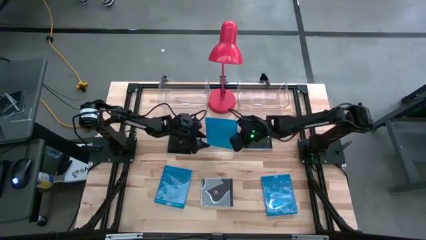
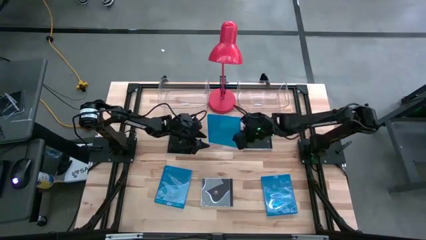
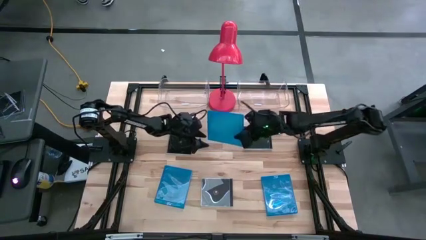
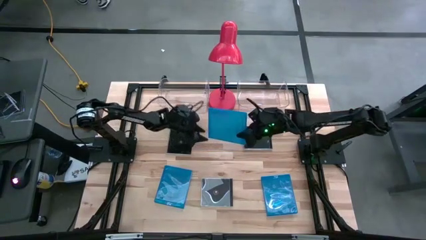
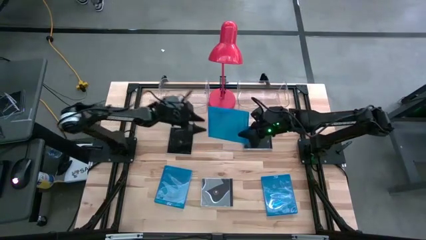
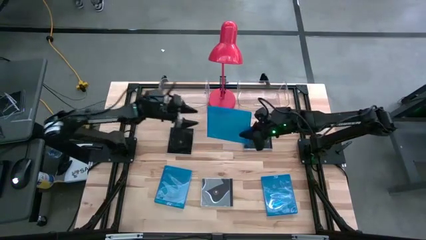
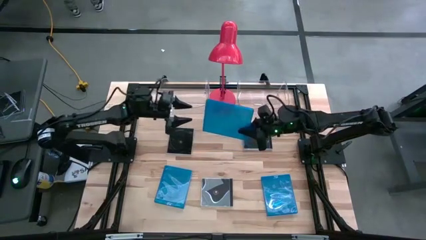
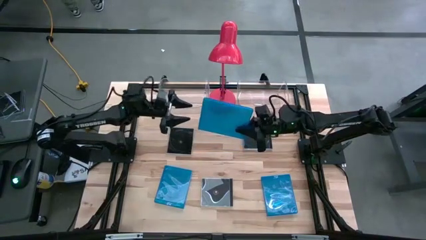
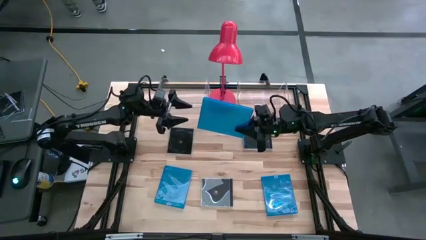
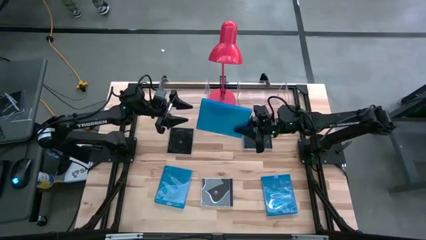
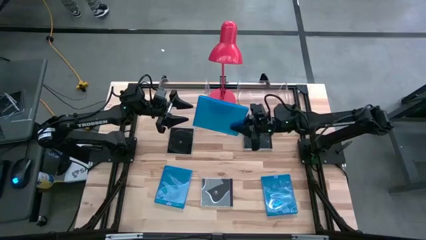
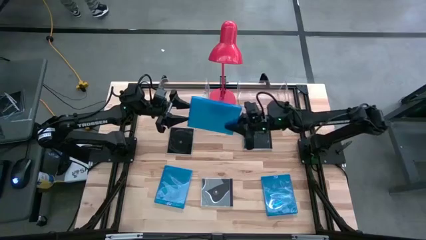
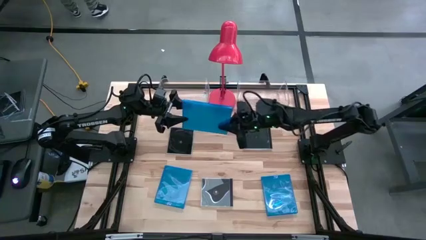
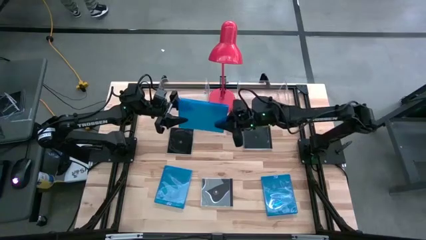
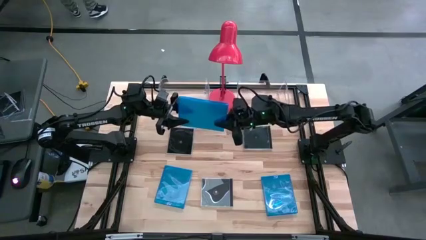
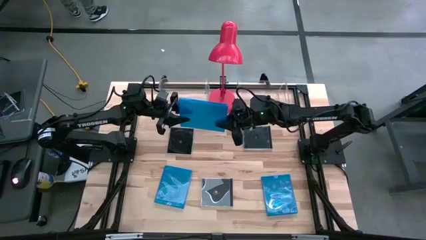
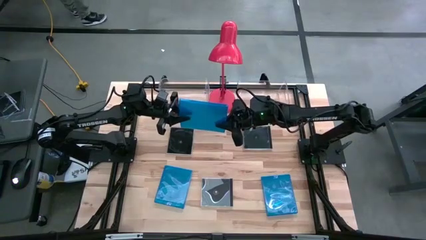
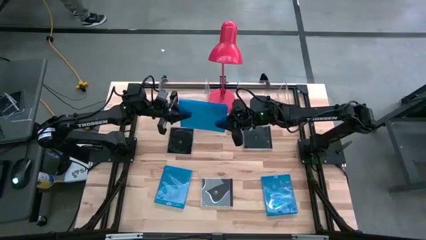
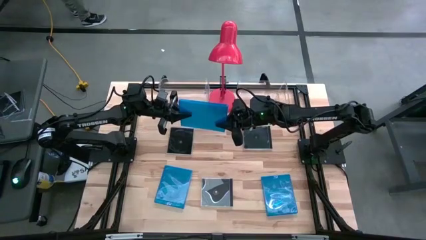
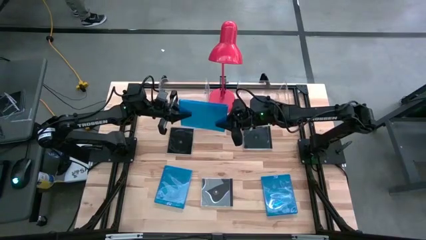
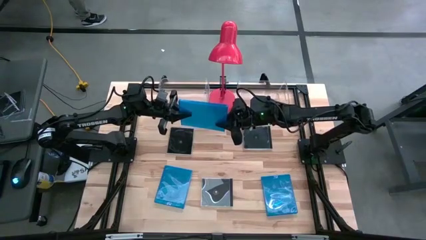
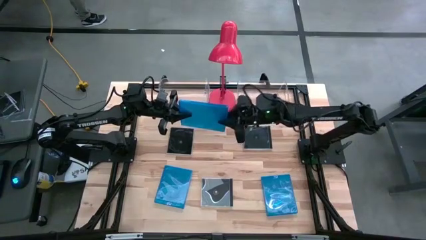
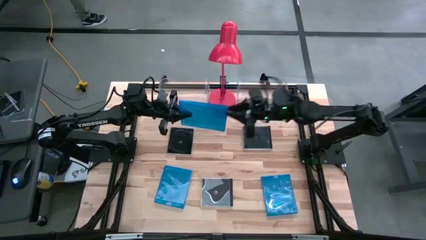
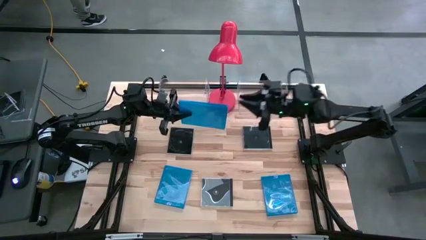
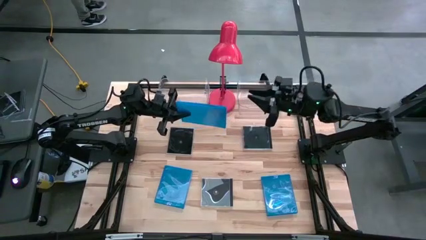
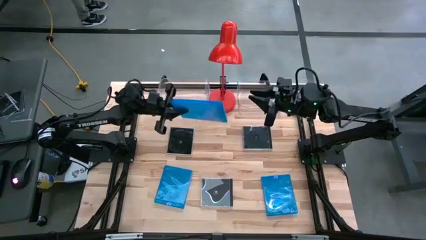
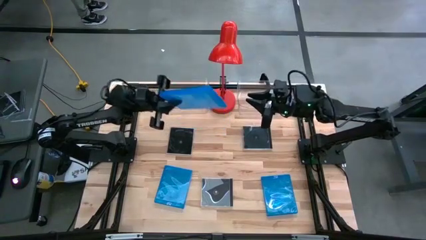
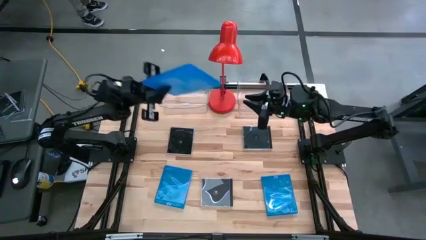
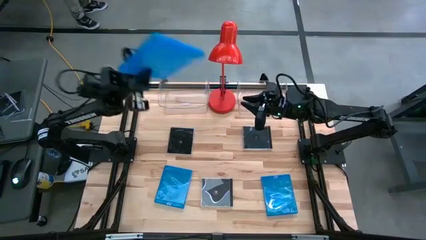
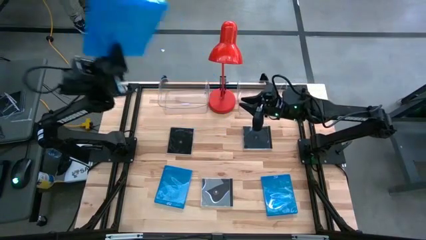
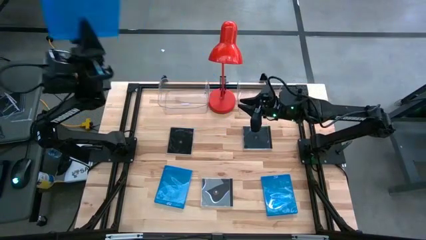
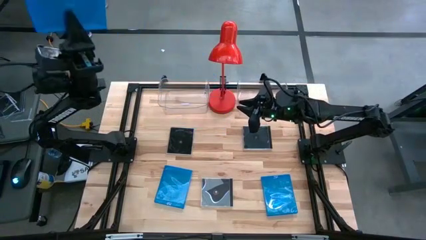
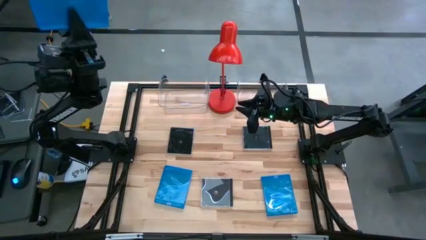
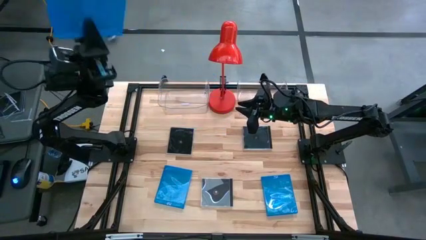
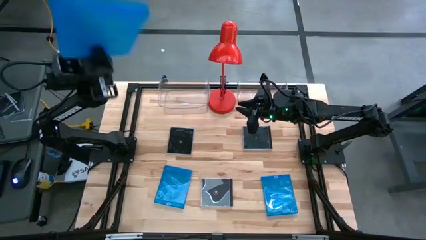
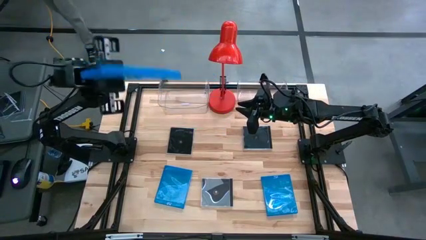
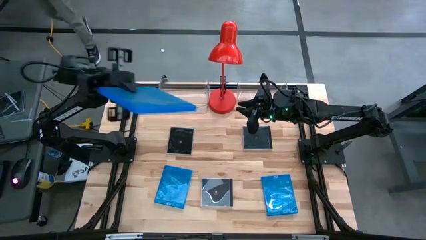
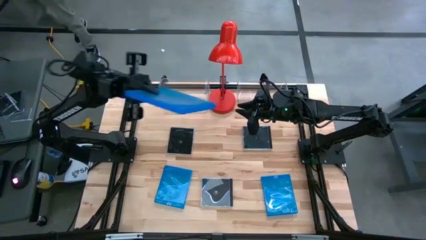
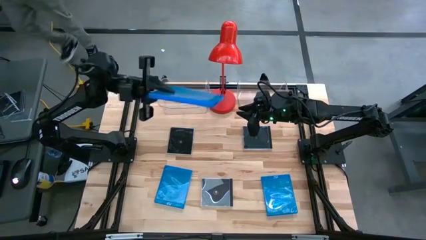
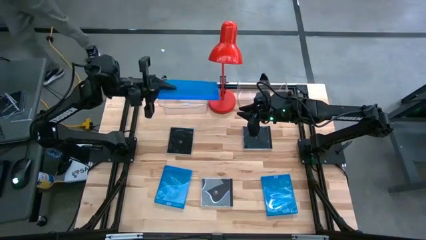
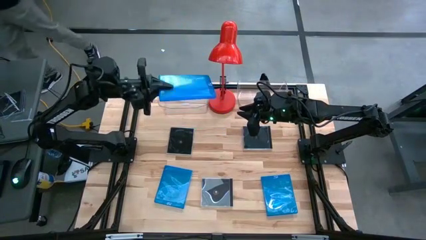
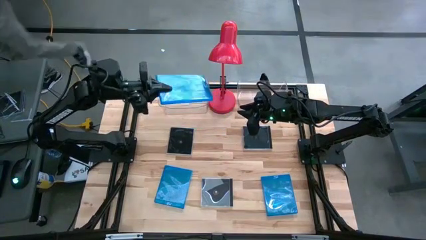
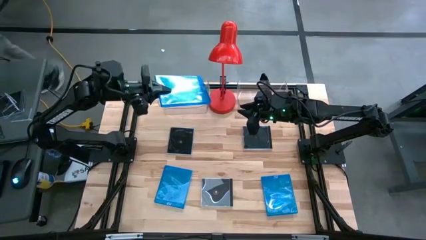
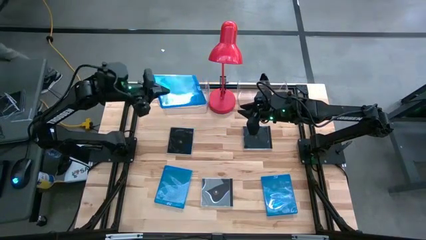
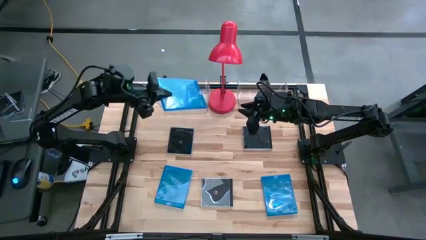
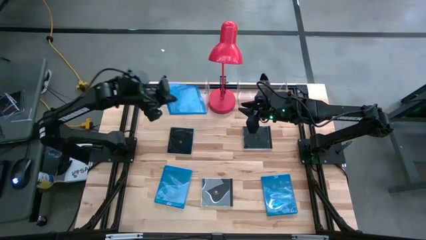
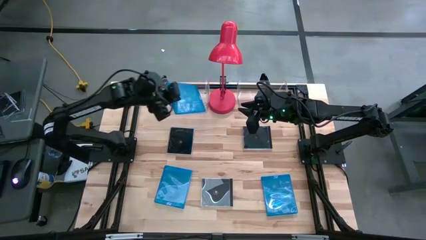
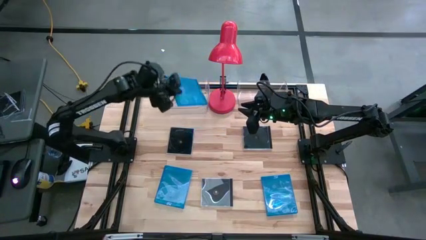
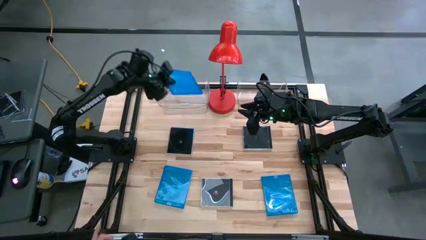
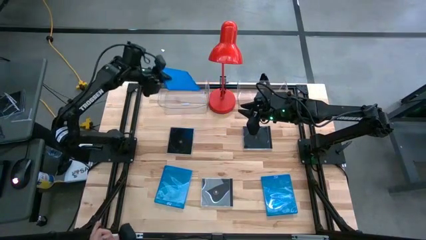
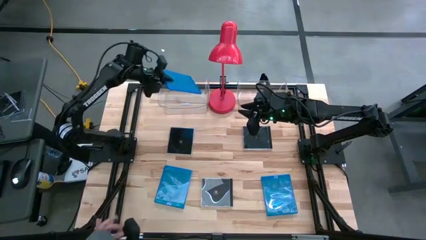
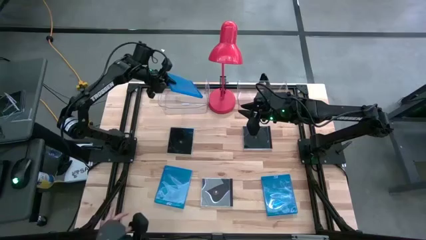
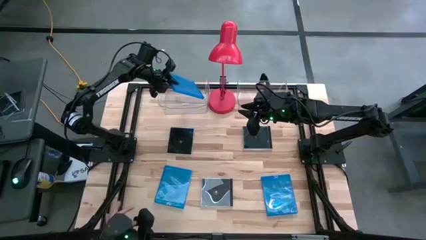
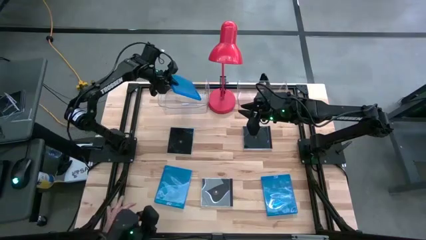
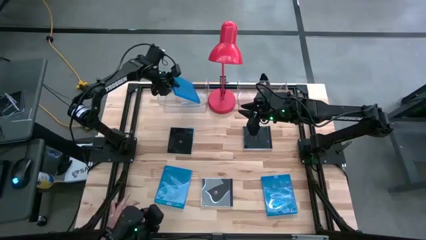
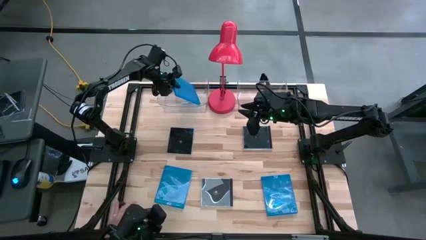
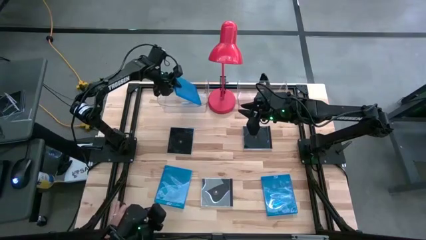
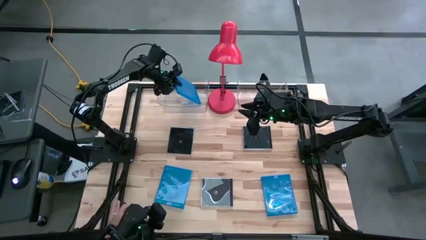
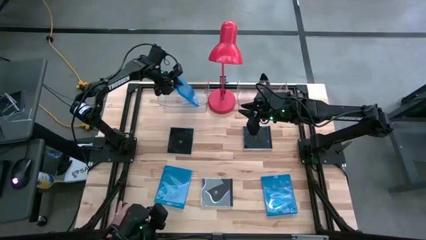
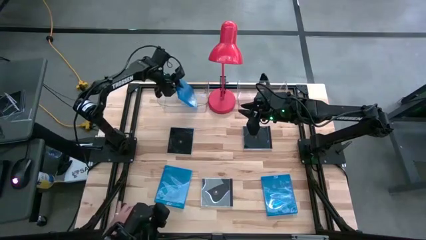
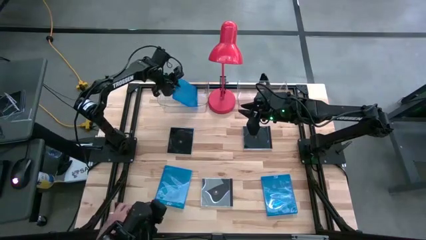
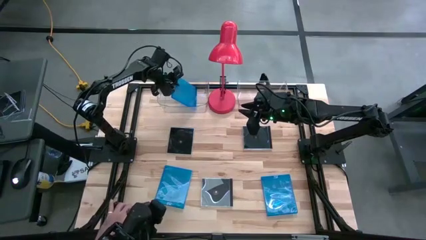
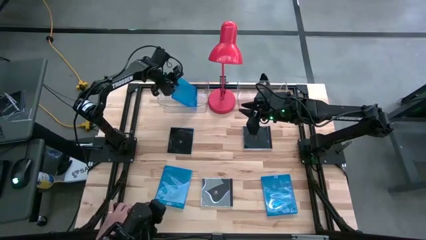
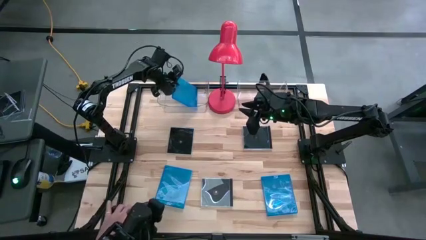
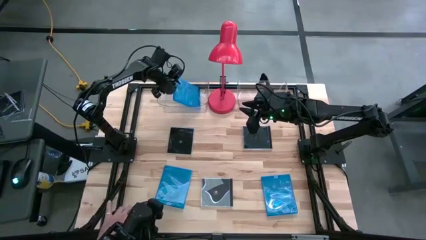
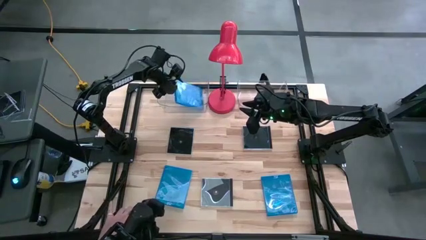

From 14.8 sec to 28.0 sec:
Task: Pick & place jewel cases by type
Put the top blue cd case into the left transparent bin
